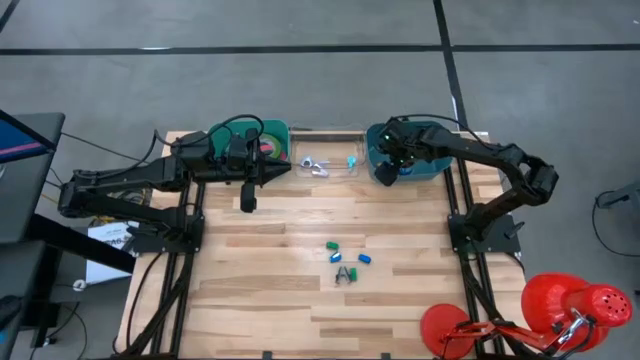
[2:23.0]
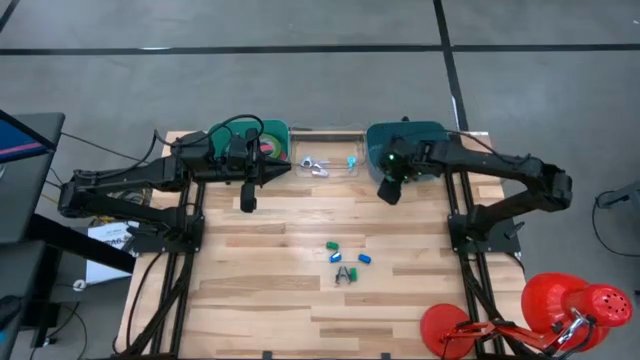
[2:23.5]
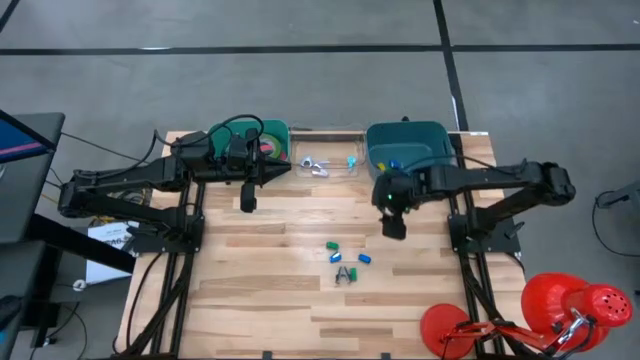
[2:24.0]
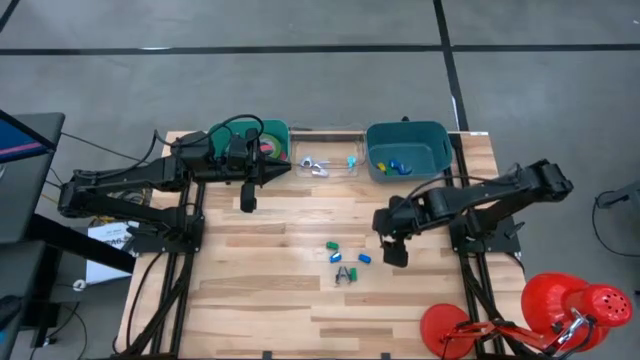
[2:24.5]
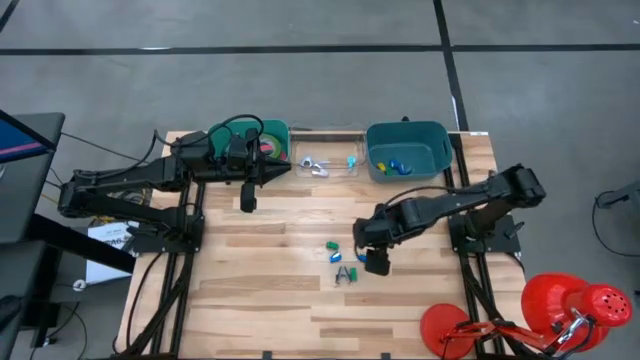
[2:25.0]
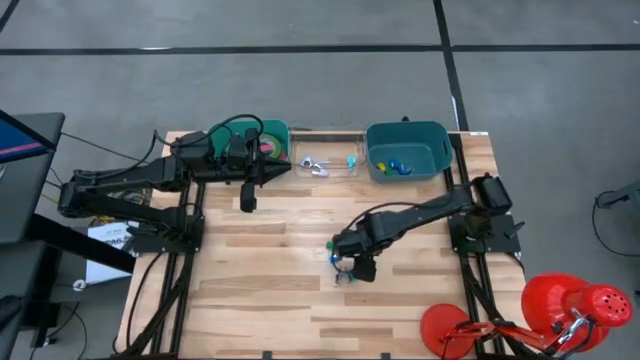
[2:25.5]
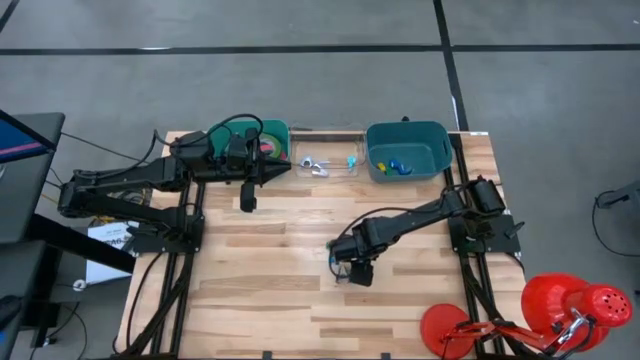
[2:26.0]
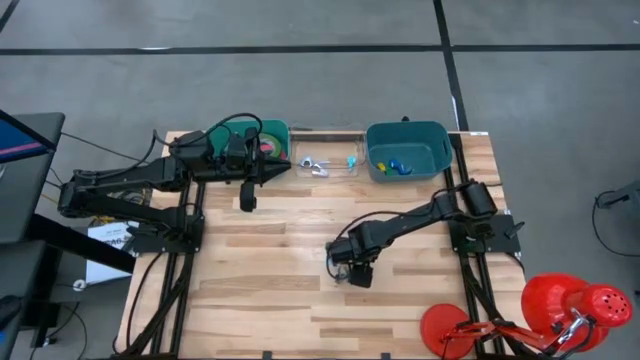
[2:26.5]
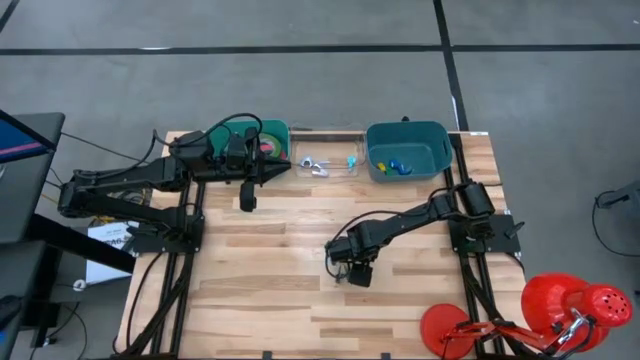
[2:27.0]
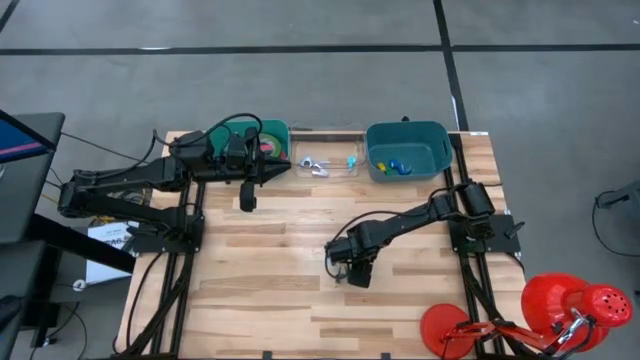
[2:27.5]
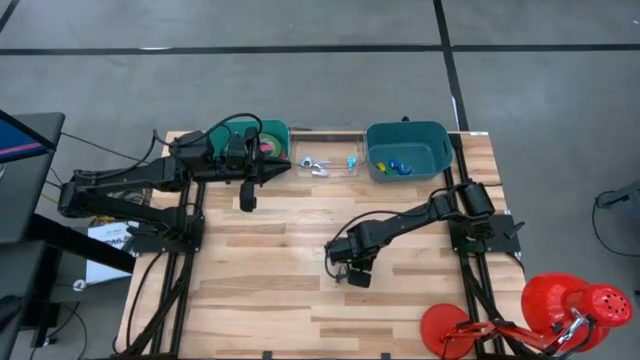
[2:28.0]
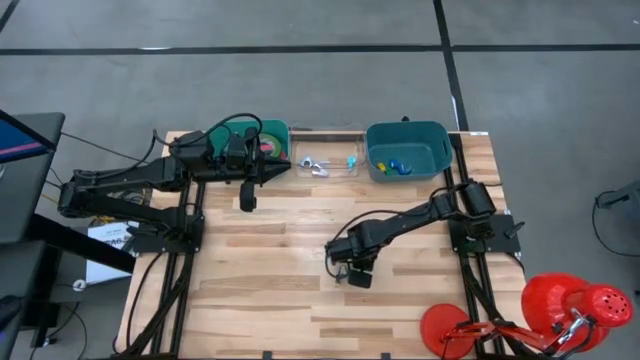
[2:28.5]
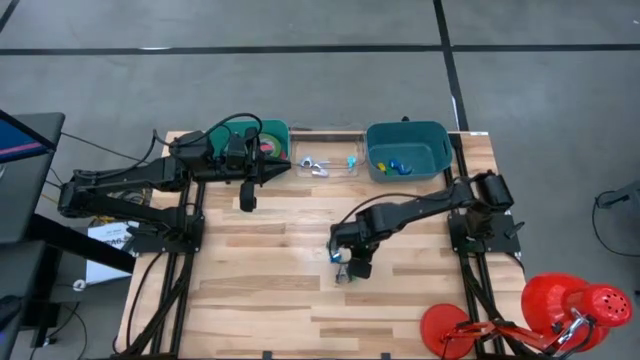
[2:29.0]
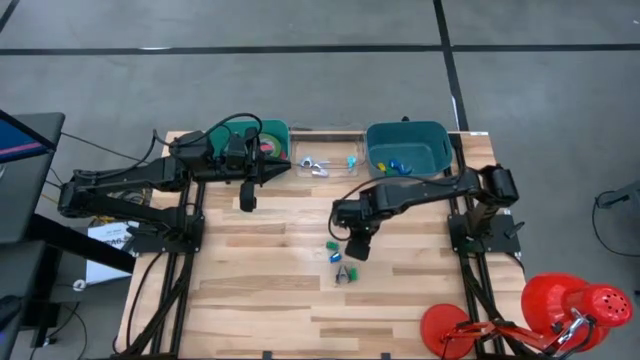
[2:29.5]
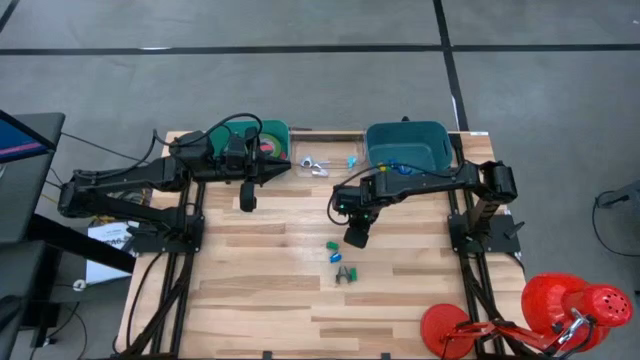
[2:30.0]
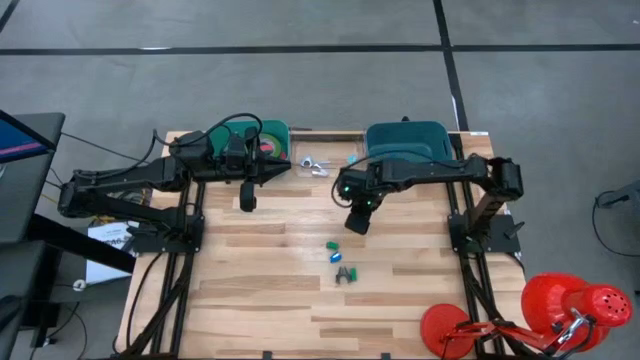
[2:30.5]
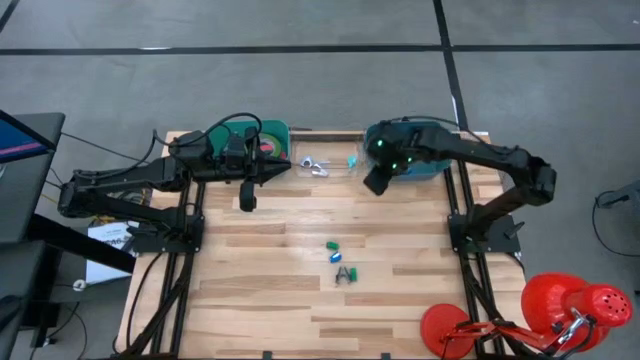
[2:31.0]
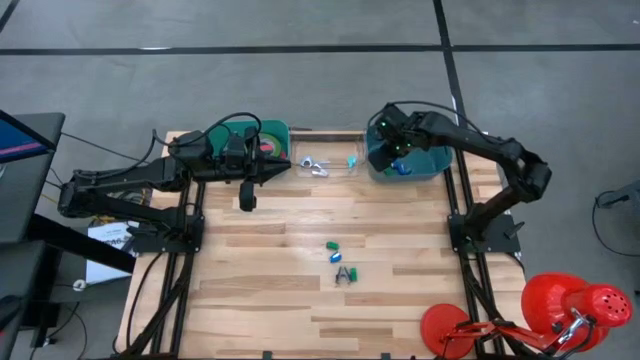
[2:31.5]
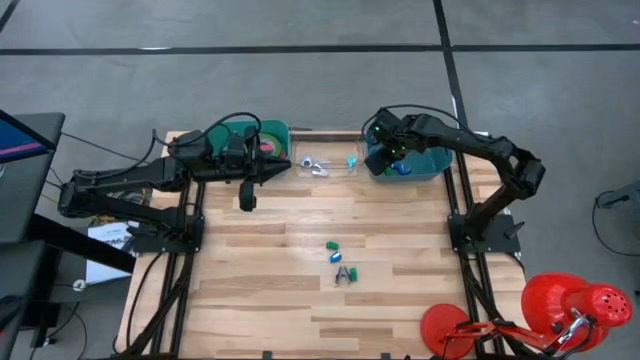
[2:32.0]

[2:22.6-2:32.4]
Task: Pick and place Stapler, Stapler remover, tape
Put the blue stapler into the dark blue bin

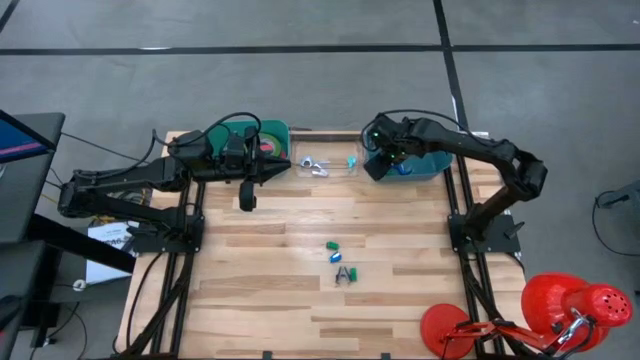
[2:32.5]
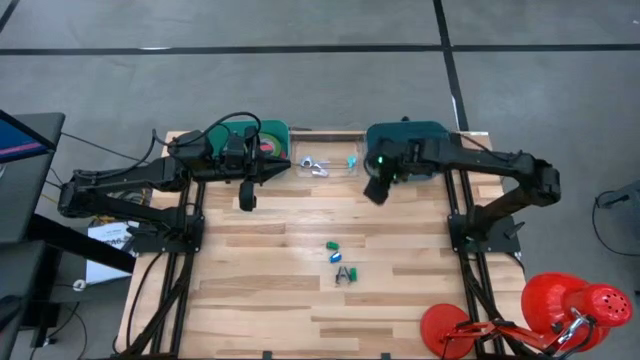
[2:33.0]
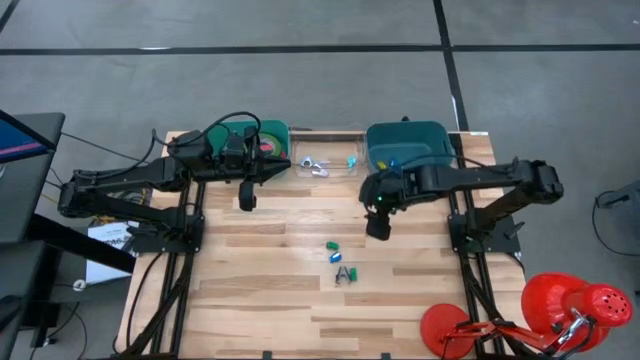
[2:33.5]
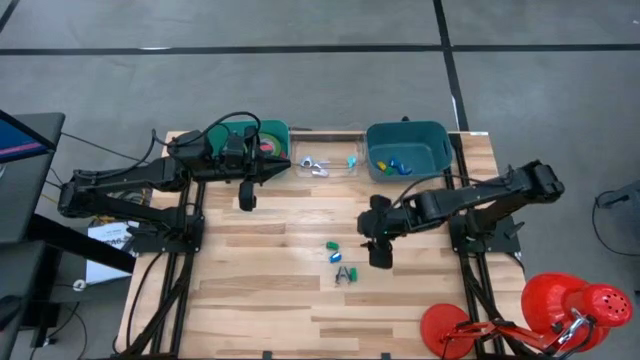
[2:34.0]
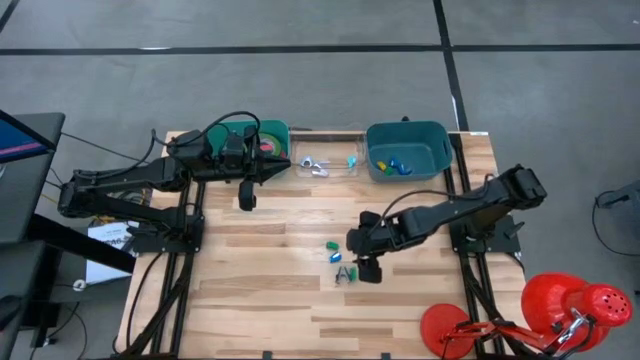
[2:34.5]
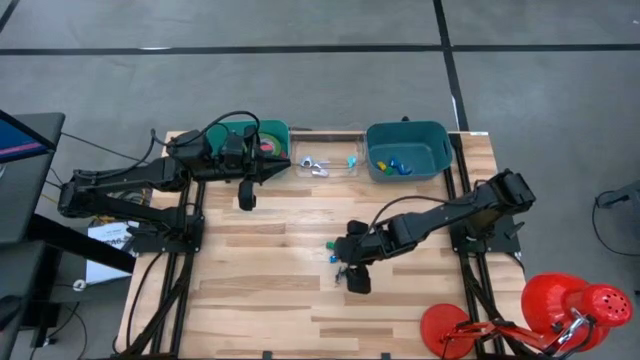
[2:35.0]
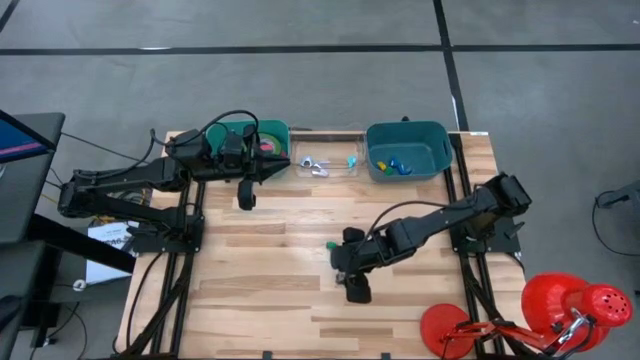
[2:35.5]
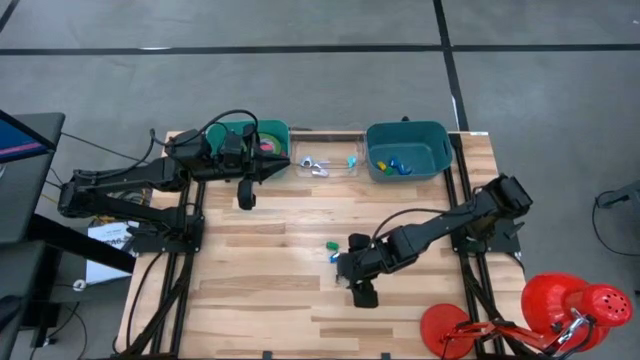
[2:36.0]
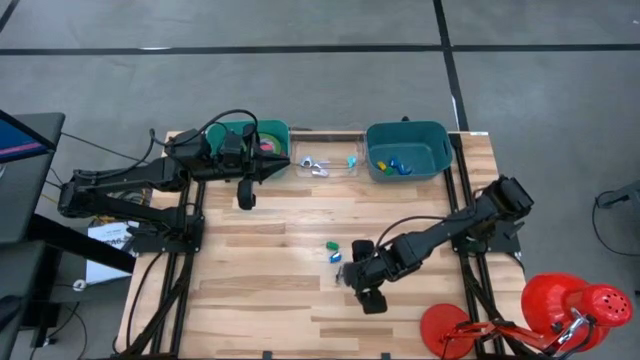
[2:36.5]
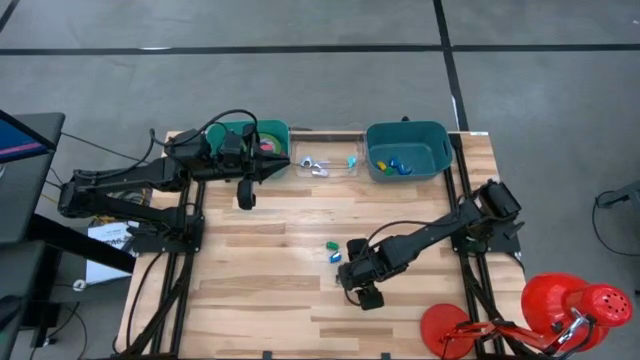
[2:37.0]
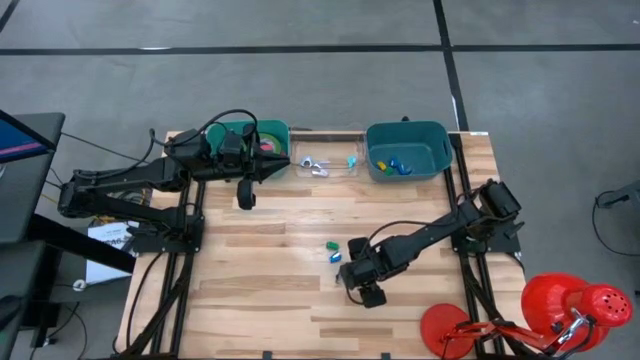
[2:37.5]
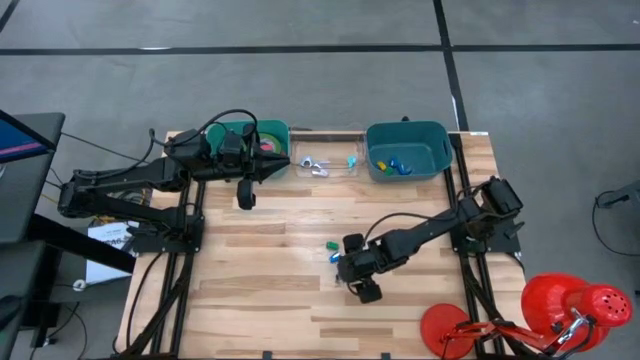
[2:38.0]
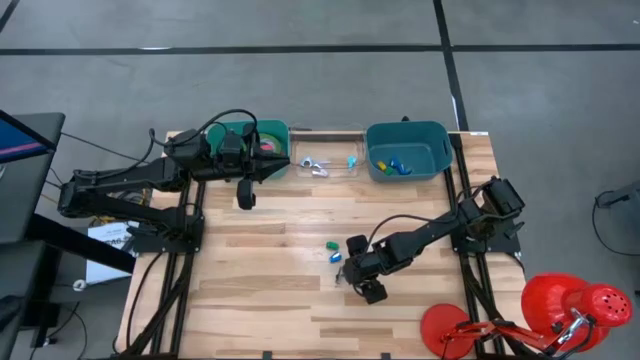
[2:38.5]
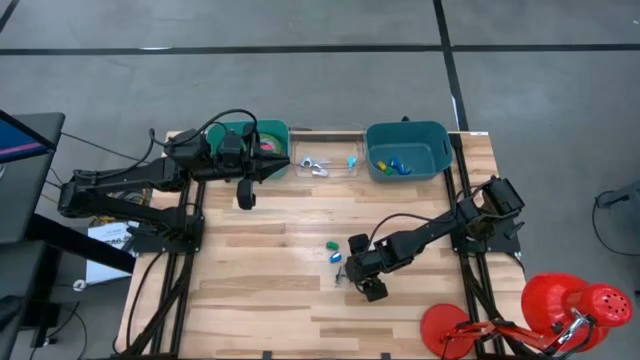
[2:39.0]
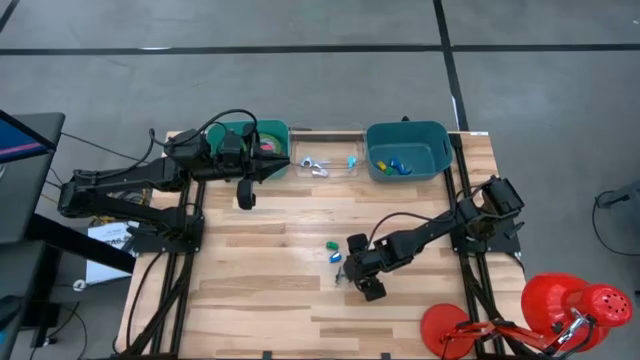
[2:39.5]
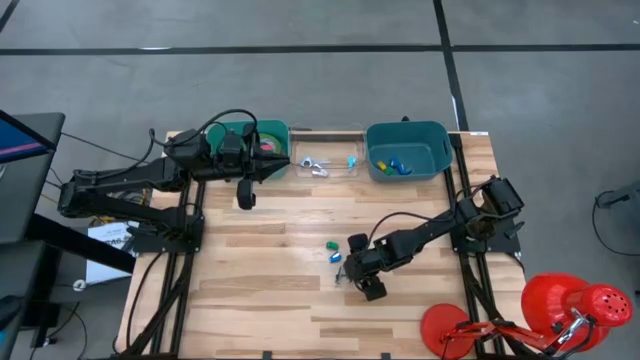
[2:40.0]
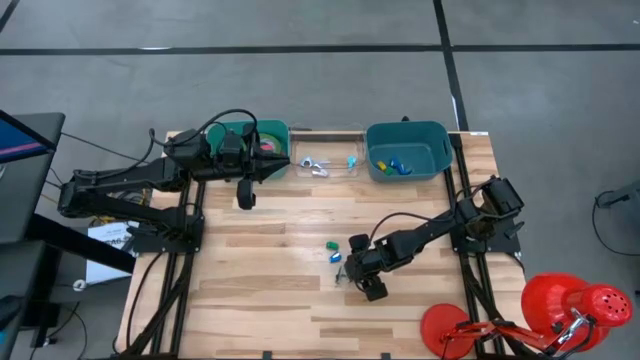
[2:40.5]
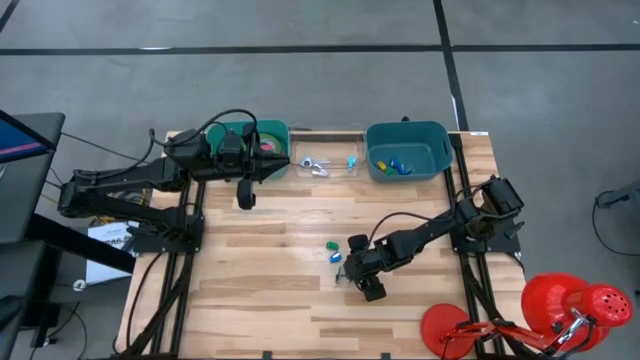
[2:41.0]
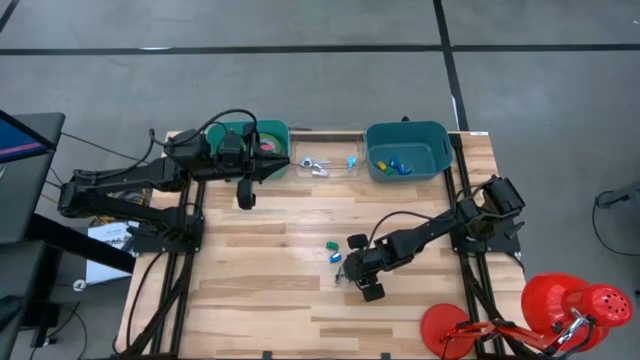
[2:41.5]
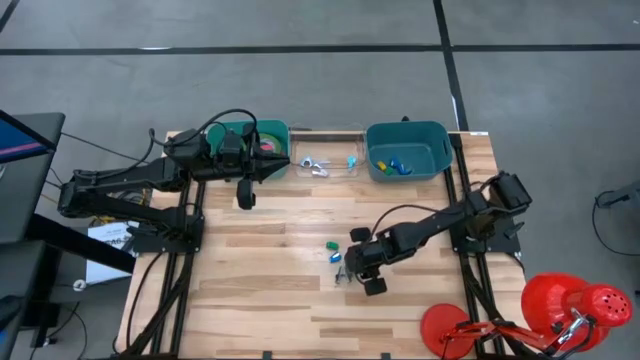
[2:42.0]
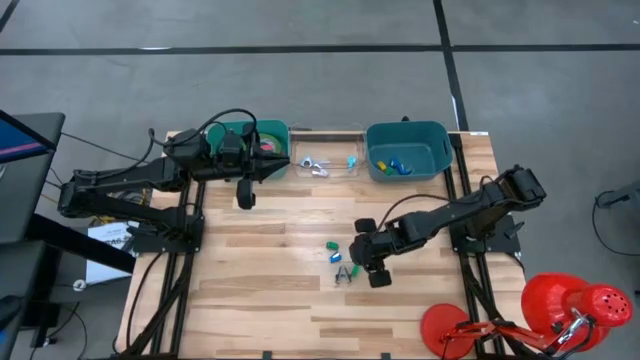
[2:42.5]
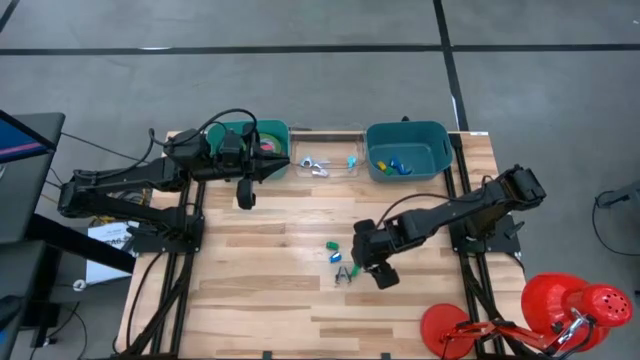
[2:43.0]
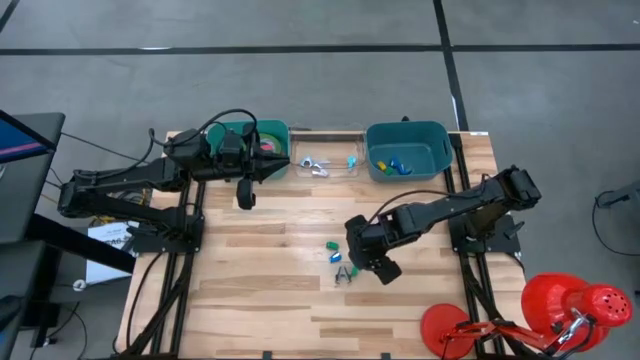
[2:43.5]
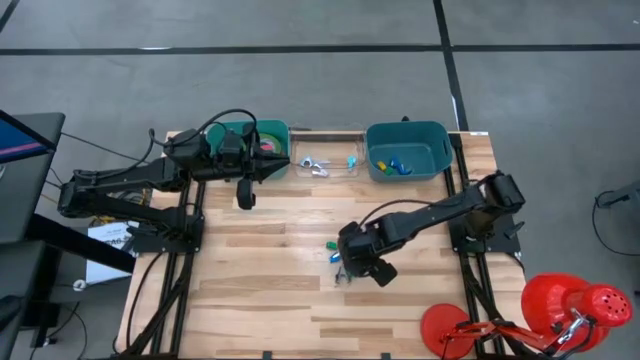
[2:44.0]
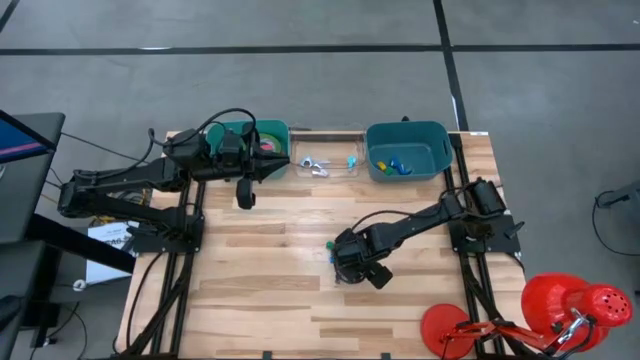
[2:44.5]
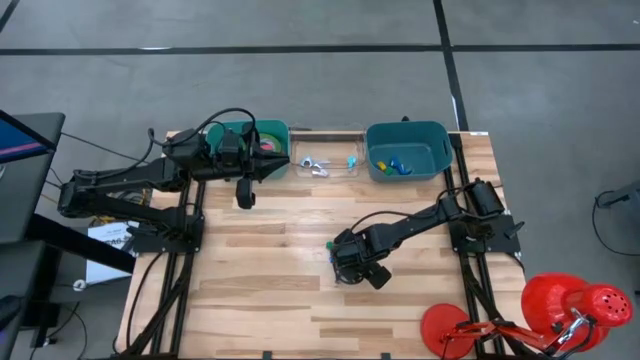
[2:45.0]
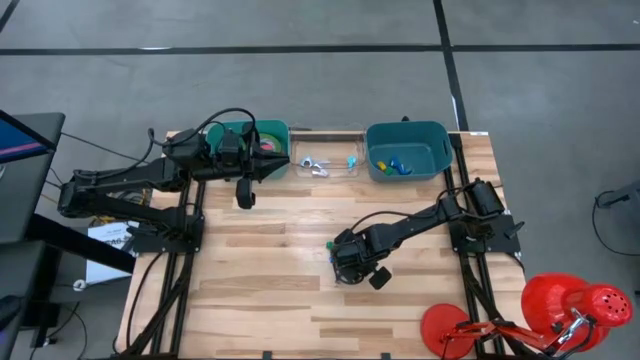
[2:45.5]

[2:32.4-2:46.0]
Put the green stapler into the dark blue bin
